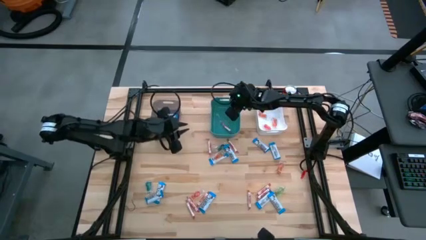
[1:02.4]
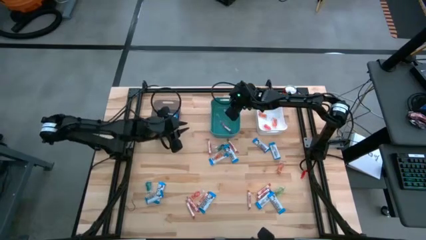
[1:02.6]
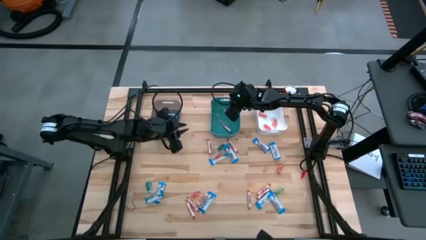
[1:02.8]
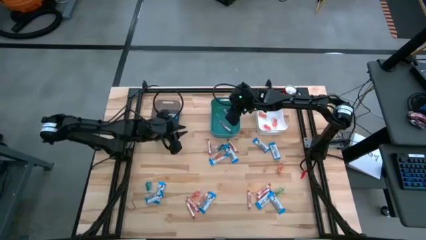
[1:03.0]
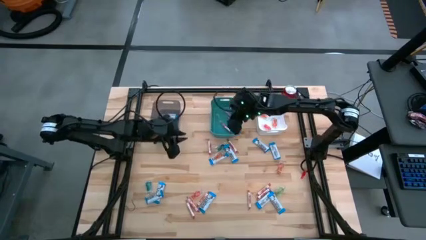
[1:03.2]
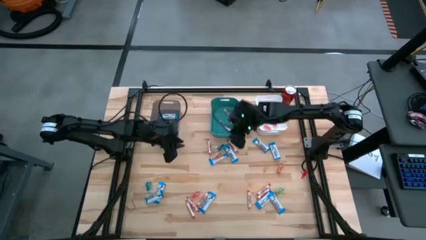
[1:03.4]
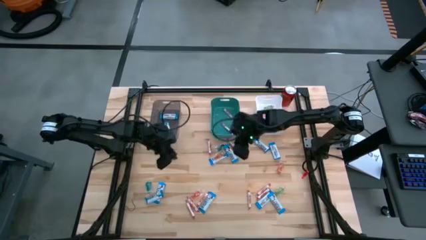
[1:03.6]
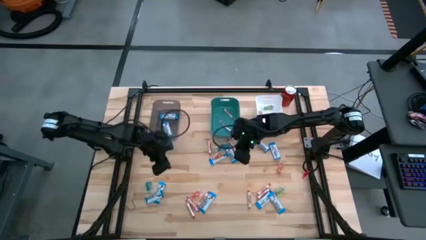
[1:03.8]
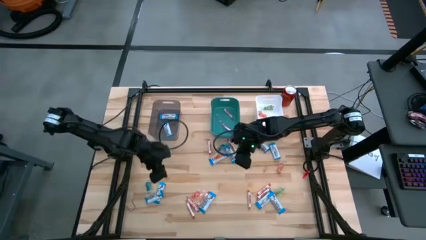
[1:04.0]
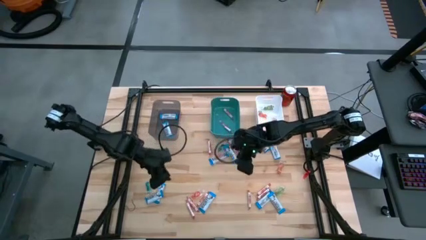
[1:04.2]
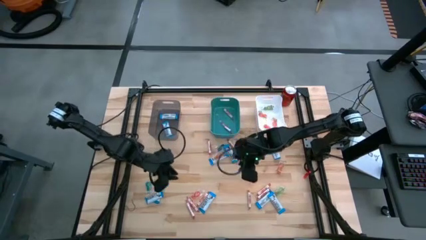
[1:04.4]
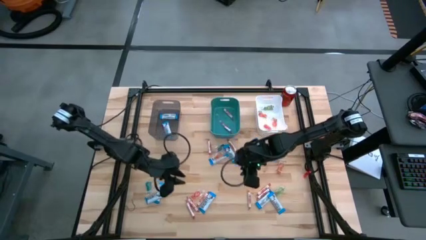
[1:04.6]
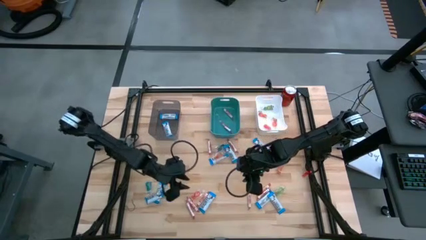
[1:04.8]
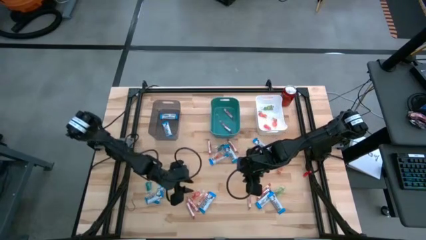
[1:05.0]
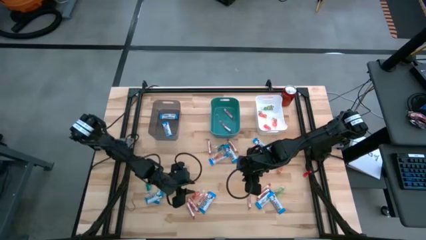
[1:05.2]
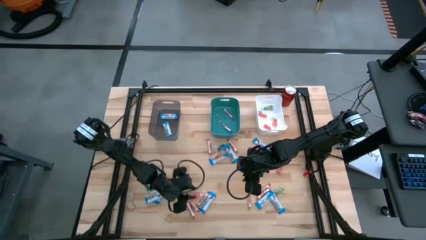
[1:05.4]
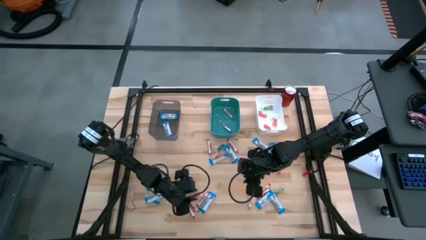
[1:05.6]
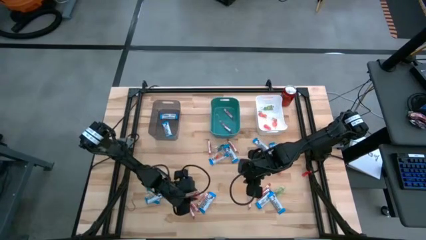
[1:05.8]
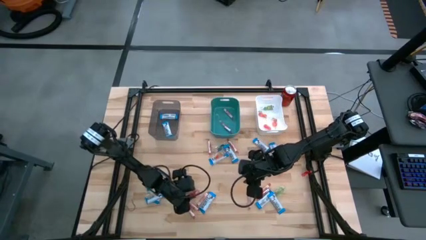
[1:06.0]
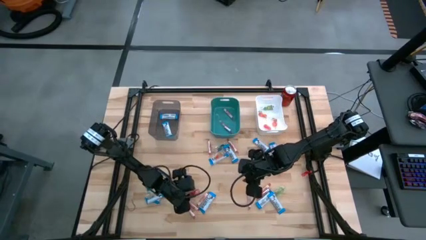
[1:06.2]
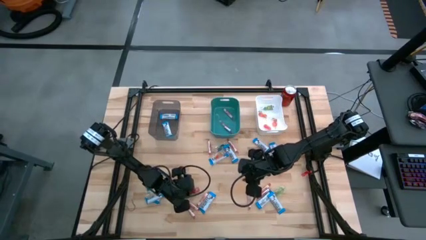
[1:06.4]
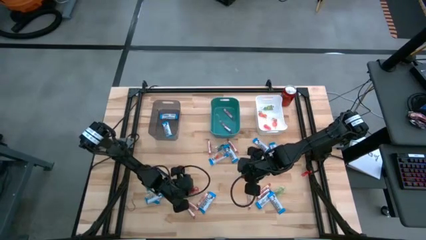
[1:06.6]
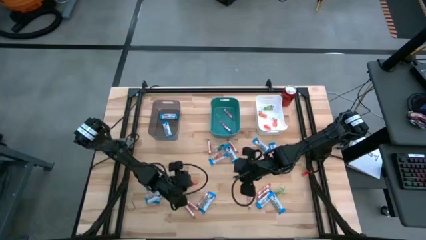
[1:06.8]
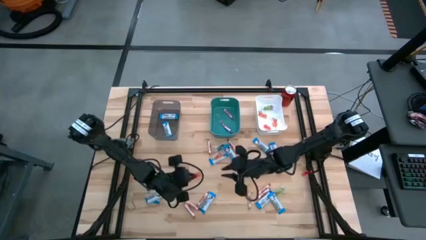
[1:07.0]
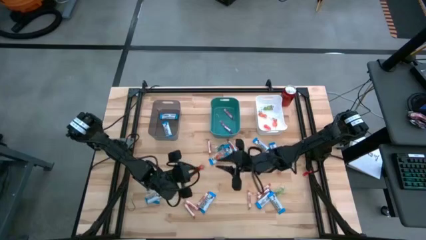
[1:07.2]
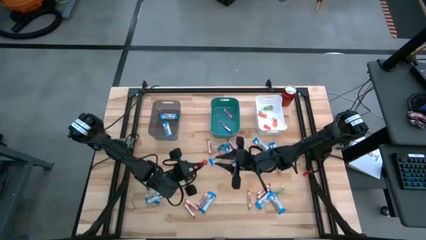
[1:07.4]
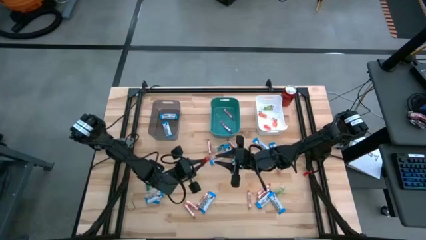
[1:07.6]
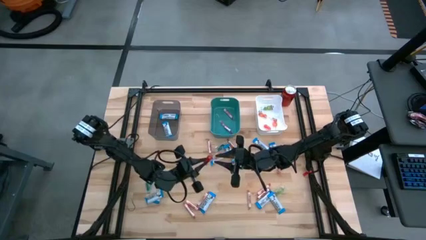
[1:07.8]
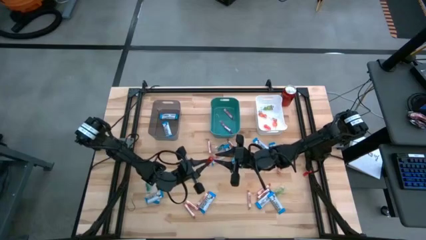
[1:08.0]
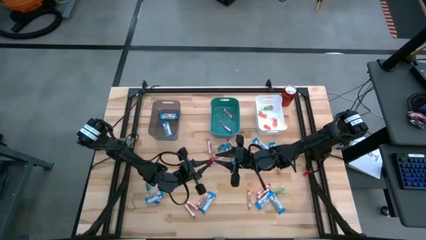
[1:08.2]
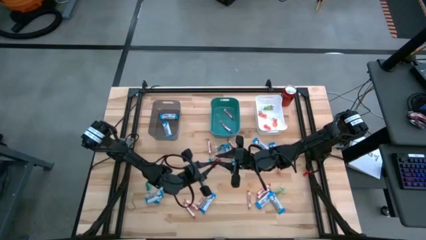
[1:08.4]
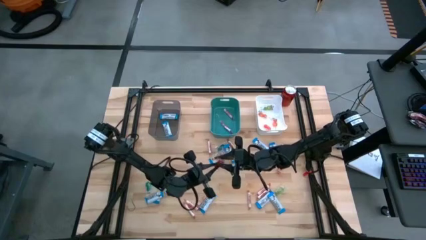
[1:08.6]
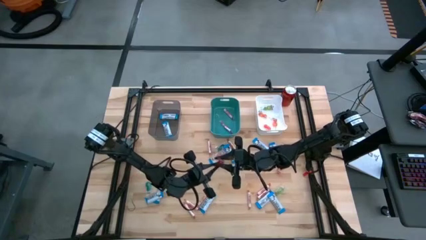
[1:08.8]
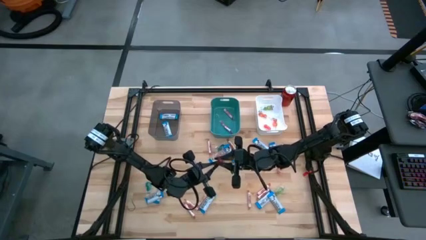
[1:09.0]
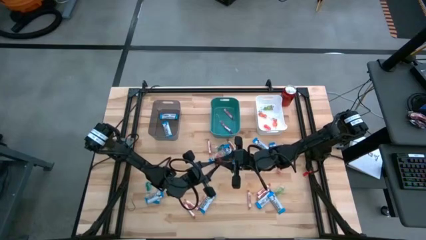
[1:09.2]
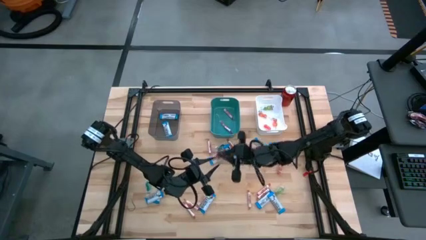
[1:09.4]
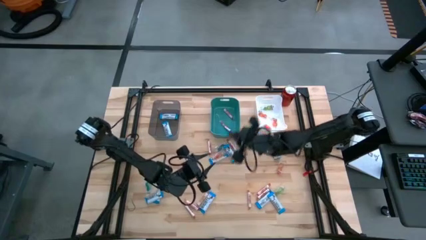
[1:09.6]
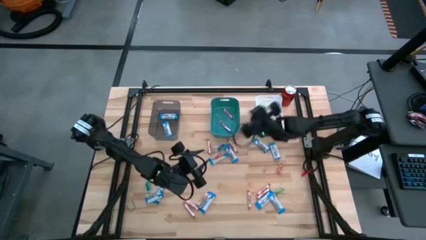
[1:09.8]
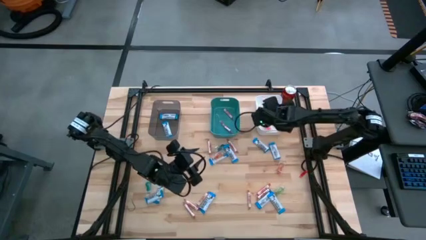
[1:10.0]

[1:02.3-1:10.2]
Task: Sort candy
Put the red gummy into the white bin

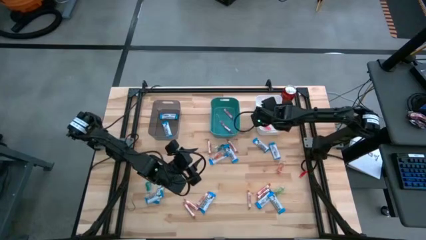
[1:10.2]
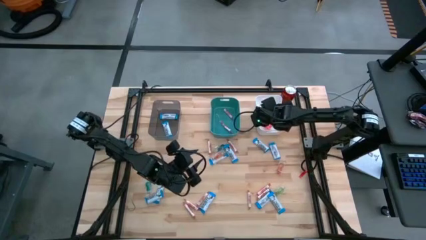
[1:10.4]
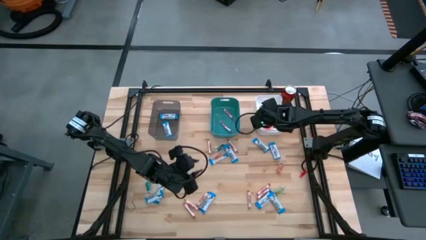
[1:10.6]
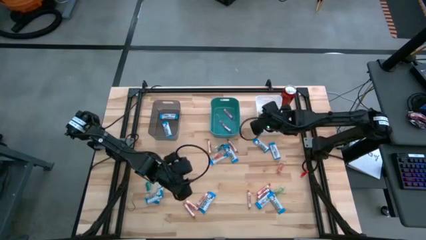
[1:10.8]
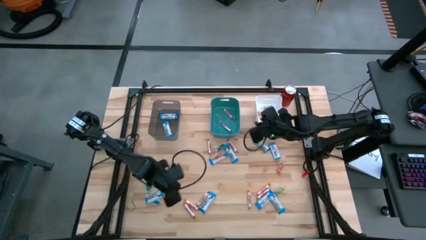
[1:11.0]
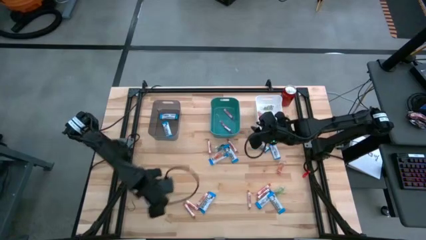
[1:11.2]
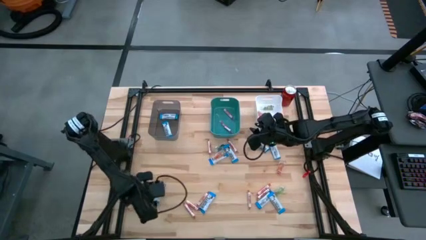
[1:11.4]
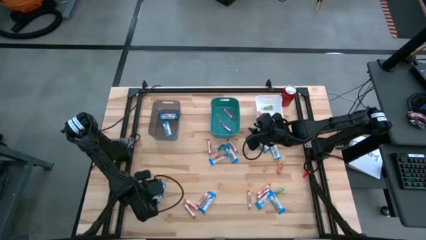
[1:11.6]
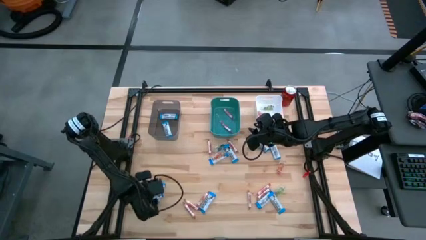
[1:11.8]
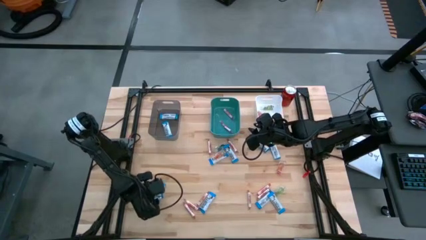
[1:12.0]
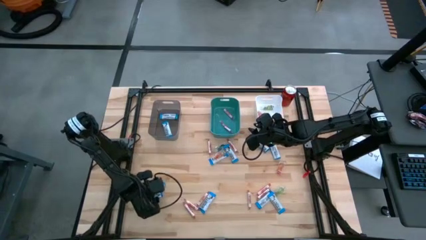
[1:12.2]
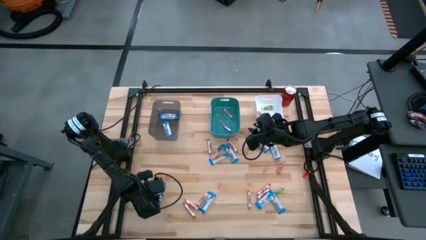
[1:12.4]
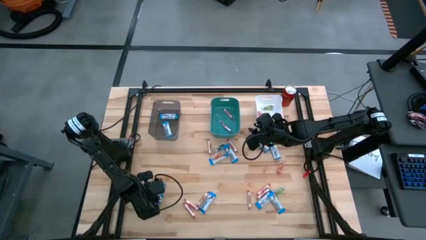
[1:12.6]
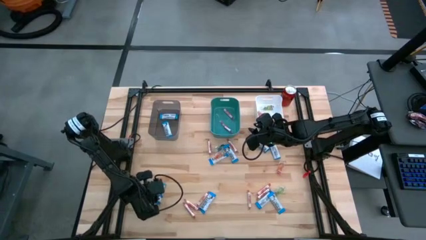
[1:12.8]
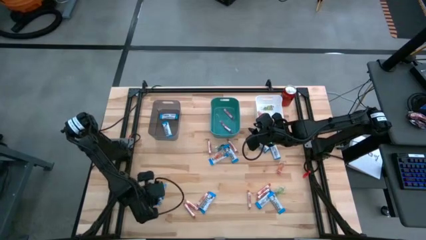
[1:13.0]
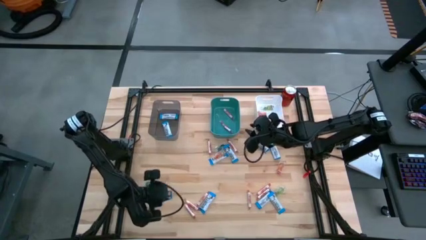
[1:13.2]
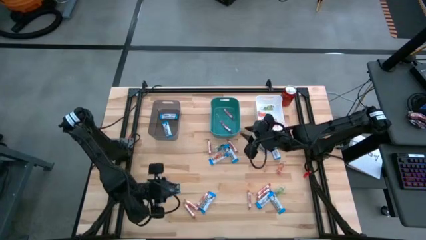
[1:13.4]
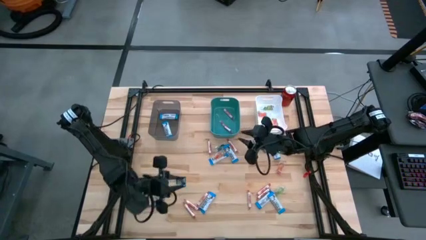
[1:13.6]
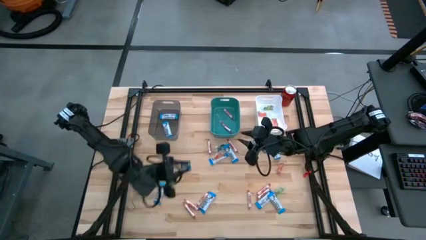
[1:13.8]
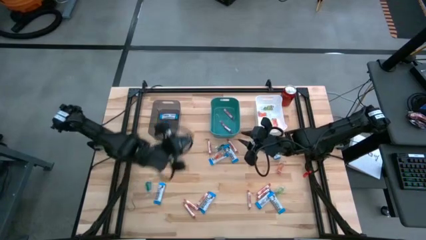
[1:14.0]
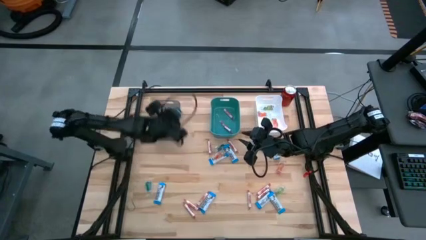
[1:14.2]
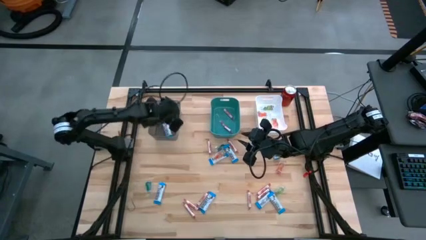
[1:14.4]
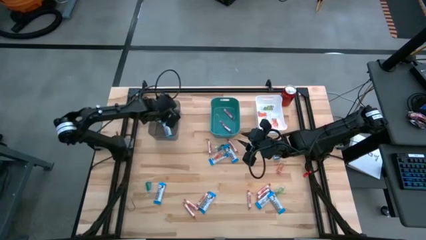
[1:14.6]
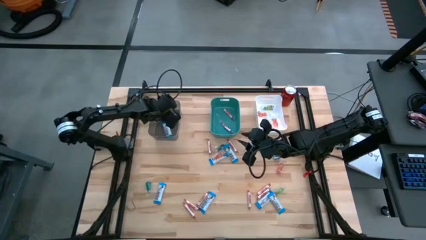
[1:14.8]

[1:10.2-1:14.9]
Put the white chocolate into the black bin

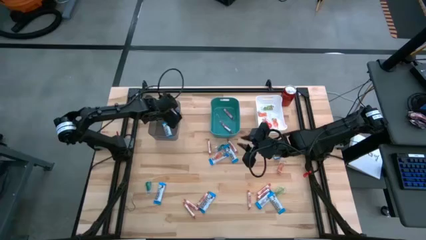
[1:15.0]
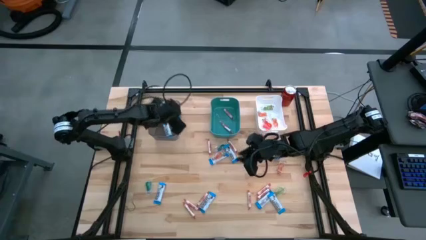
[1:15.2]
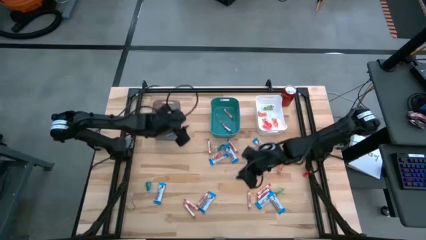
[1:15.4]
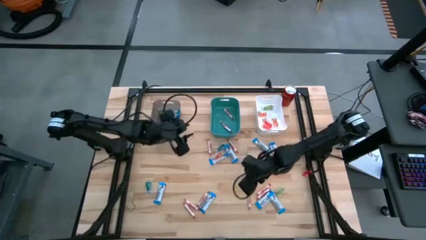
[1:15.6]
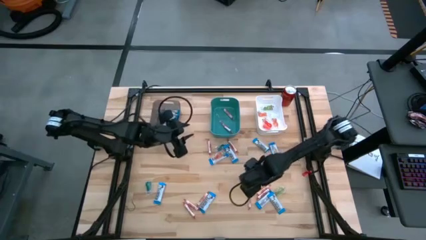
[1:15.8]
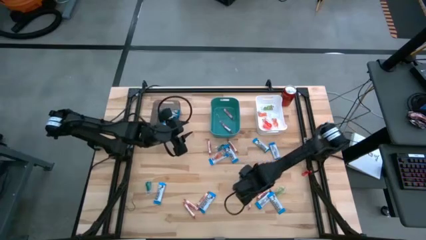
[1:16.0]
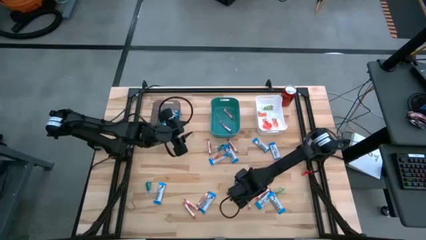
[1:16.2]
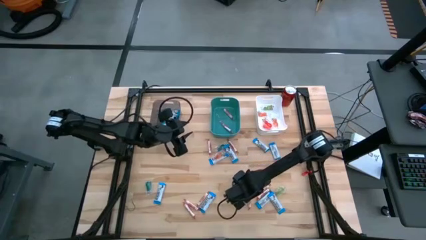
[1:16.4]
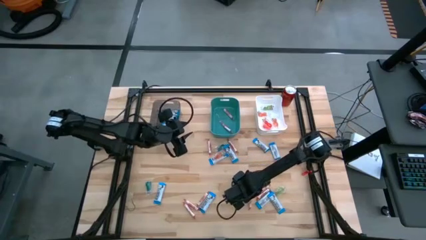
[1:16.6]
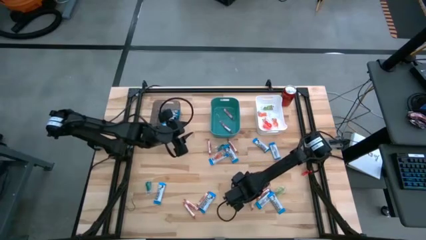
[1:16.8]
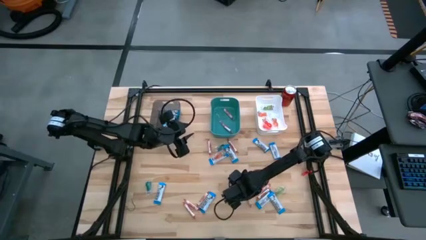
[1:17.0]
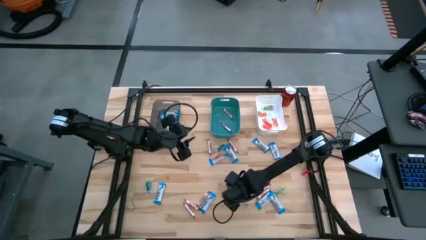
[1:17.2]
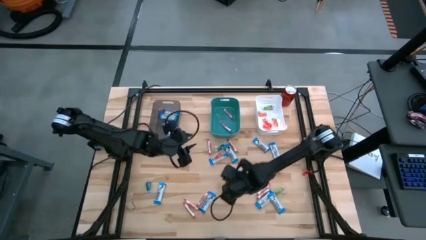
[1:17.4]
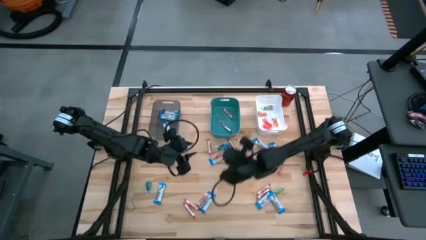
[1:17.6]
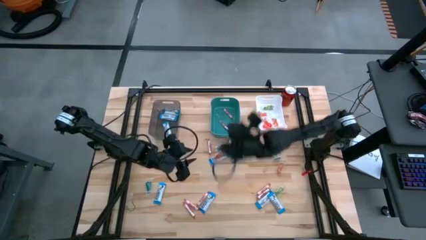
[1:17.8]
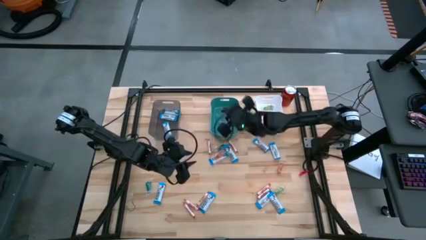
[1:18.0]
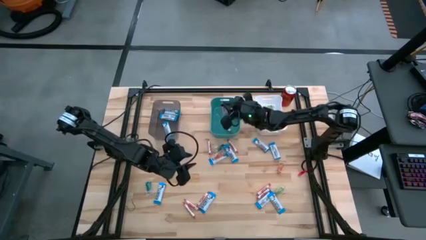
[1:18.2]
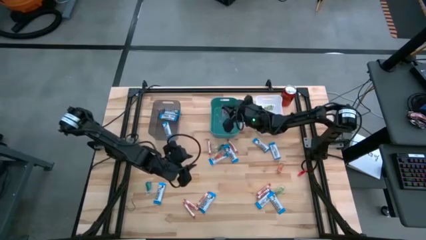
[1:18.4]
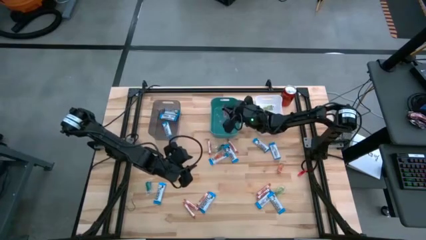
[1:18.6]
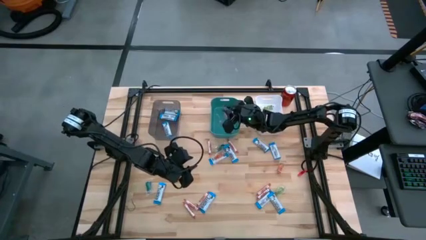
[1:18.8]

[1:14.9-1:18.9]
Put the red candy into the blue bin
